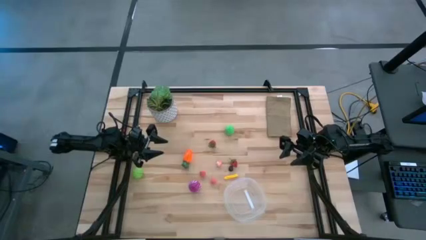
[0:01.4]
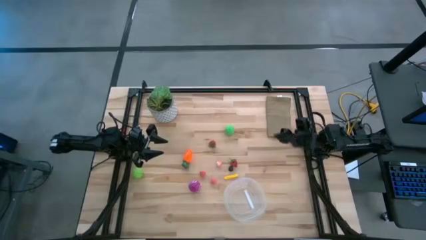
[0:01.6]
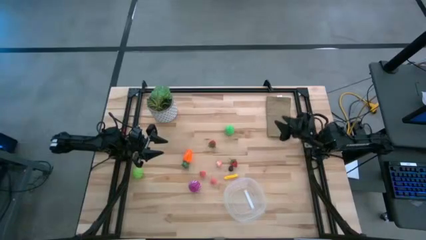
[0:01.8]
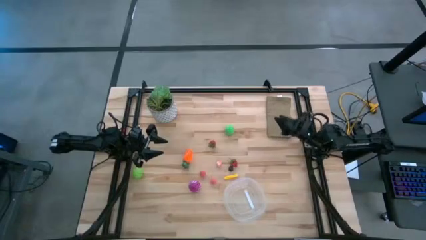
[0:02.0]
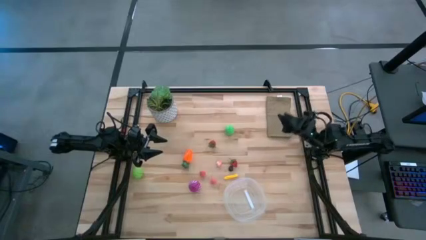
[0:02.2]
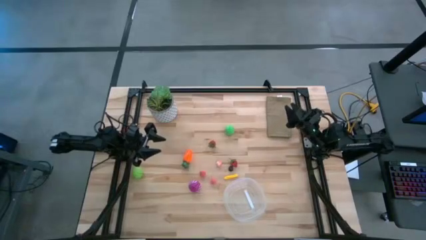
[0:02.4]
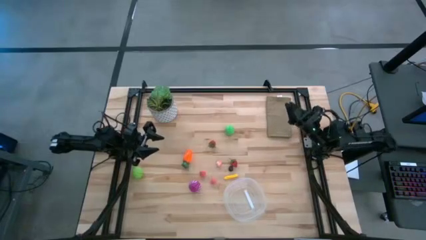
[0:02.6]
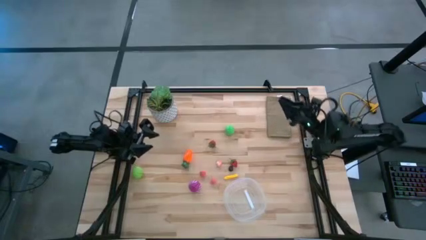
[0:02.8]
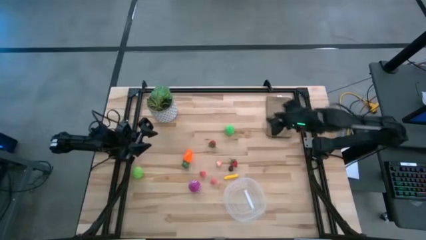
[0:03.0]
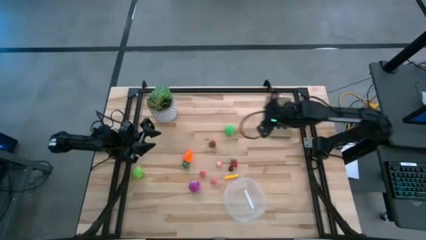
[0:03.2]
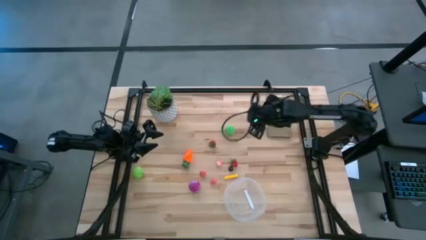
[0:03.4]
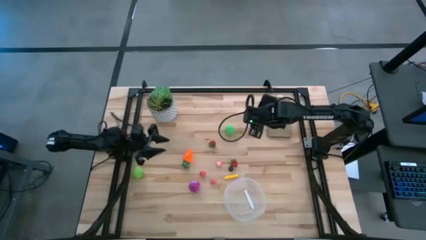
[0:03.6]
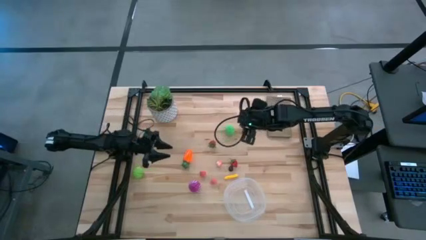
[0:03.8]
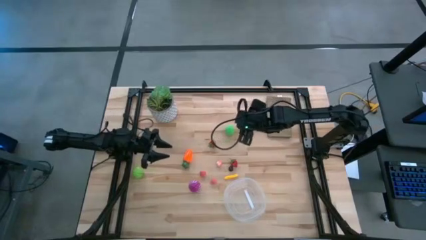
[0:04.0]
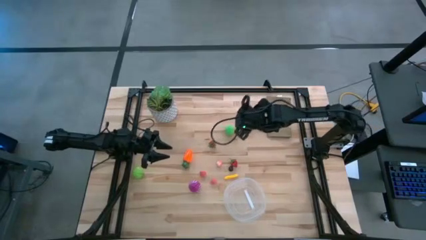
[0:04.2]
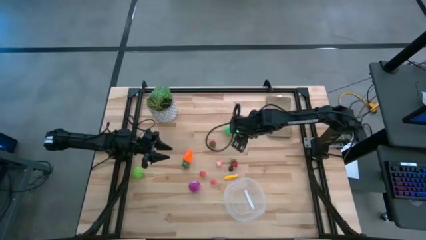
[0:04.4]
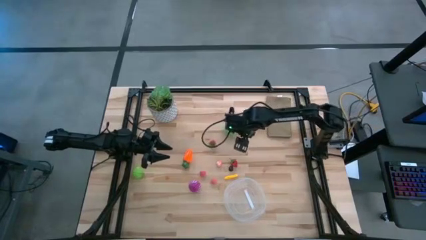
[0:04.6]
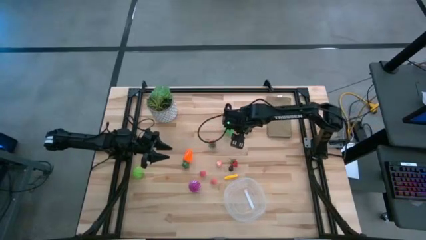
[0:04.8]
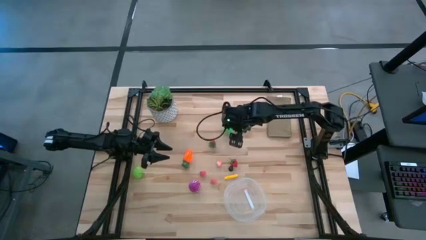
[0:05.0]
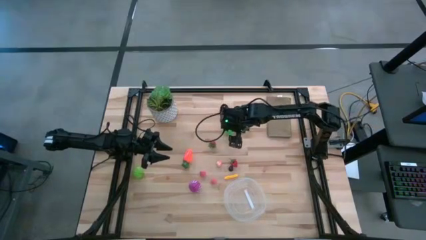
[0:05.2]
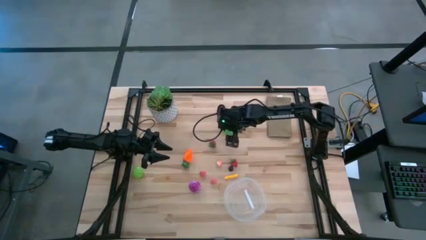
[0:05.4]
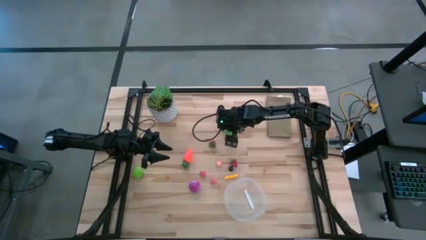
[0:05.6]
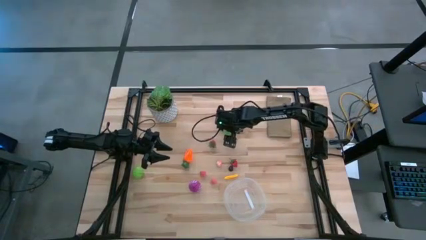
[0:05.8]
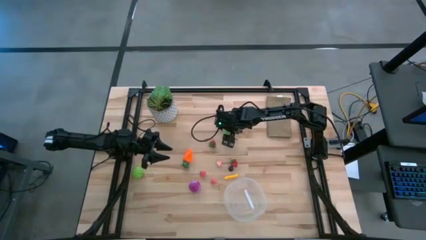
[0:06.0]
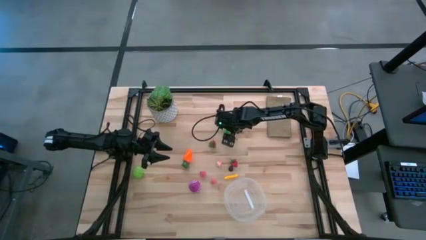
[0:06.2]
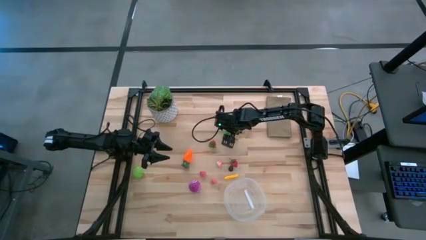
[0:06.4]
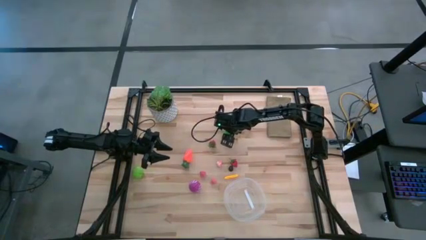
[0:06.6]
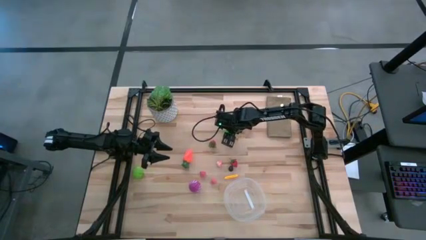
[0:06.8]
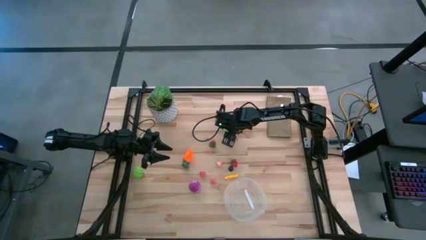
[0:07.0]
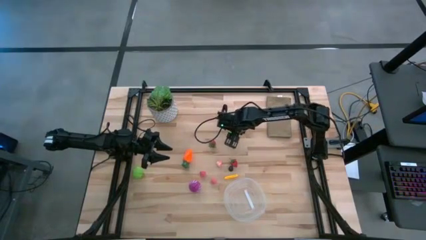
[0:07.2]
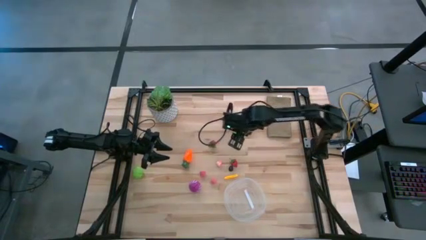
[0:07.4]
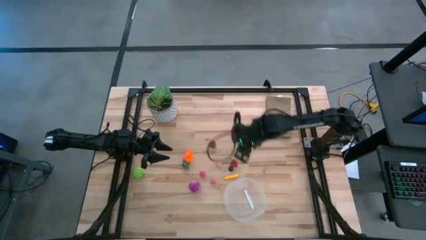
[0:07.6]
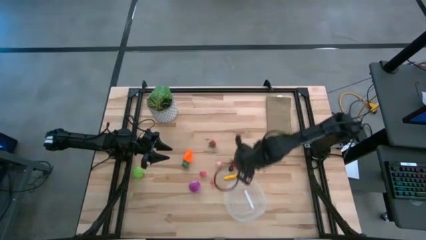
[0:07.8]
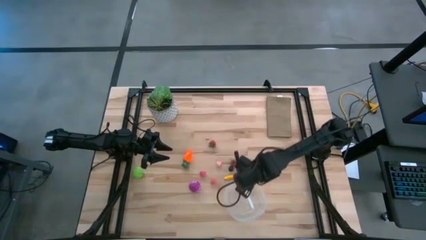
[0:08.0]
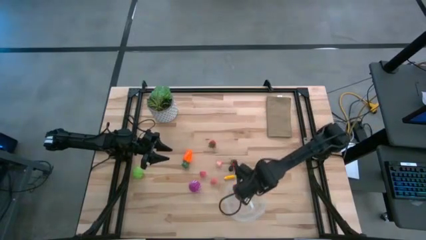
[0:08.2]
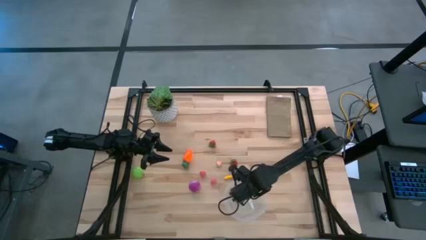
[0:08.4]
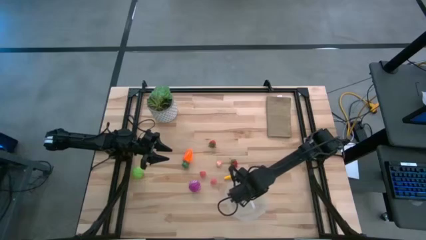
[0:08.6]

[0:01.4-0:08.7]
Task: Pick and placing Produce into tupperware
Put the pear into the transparent bin

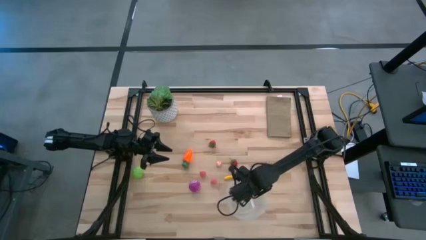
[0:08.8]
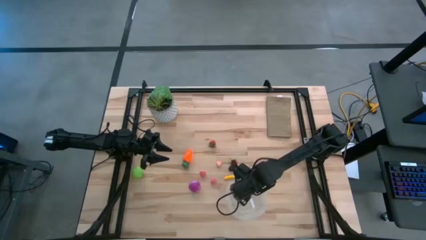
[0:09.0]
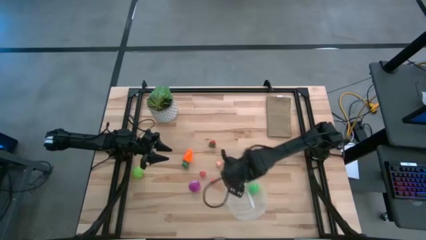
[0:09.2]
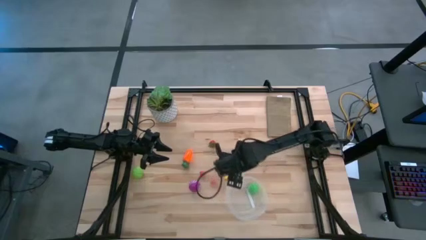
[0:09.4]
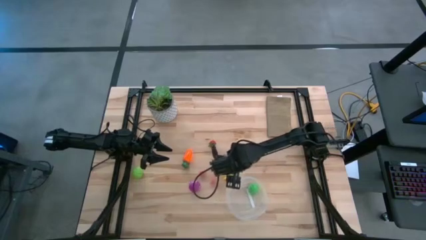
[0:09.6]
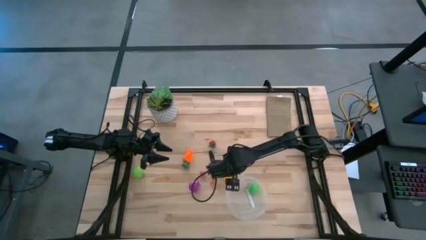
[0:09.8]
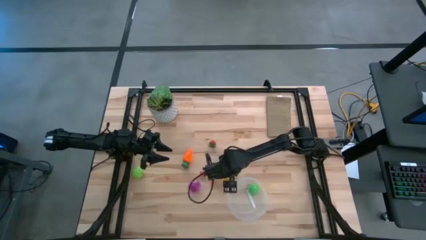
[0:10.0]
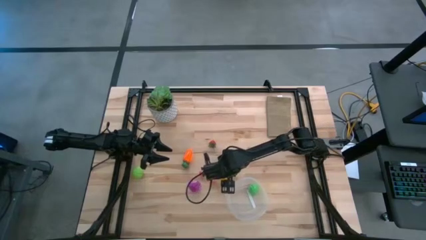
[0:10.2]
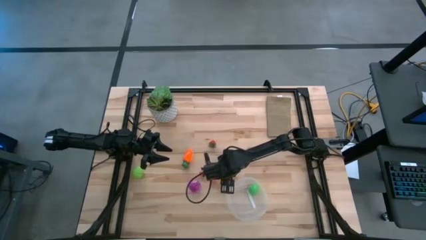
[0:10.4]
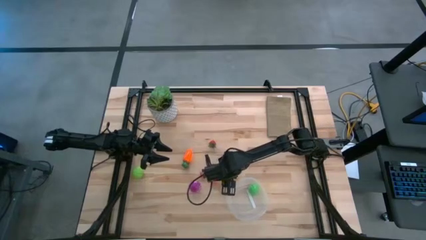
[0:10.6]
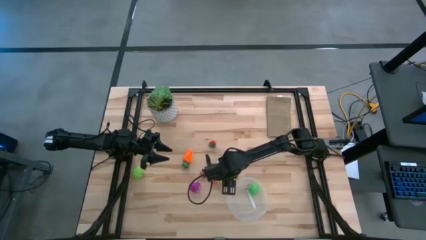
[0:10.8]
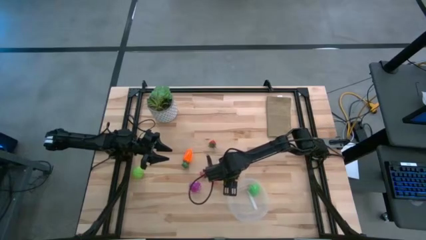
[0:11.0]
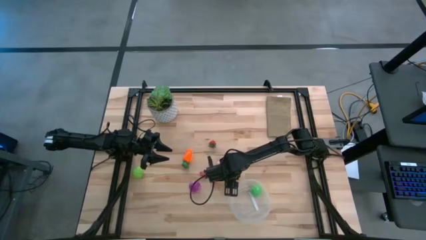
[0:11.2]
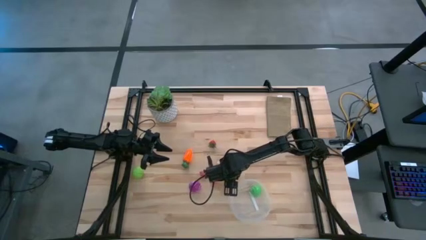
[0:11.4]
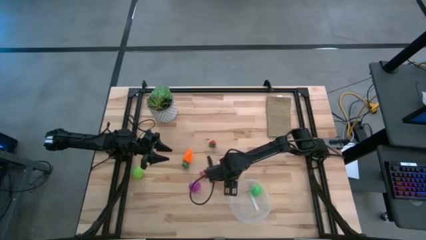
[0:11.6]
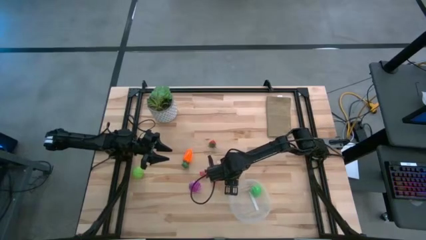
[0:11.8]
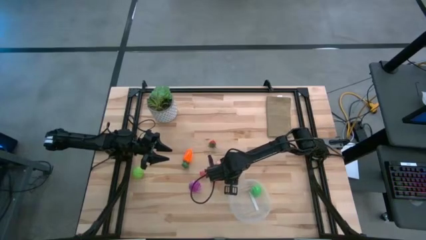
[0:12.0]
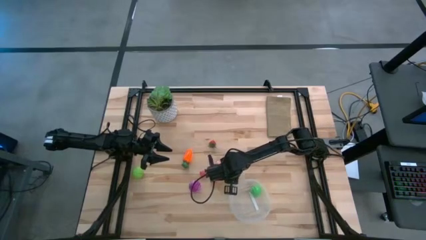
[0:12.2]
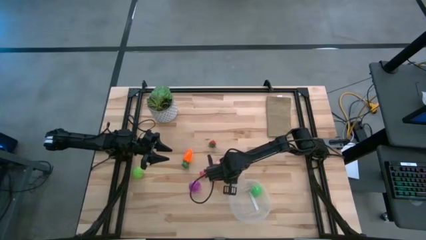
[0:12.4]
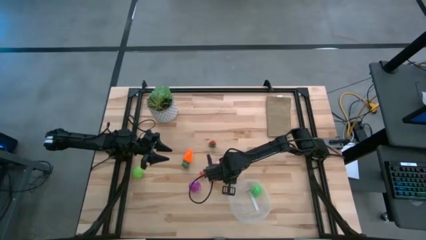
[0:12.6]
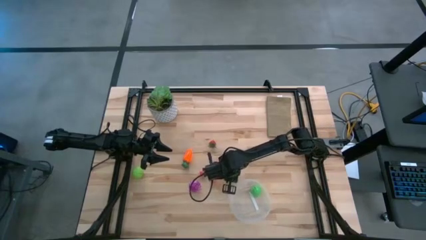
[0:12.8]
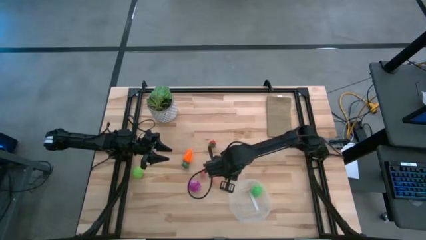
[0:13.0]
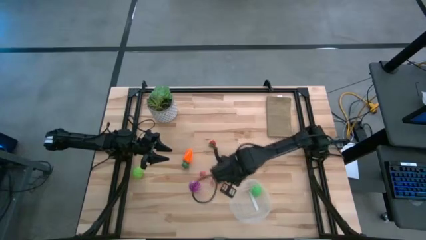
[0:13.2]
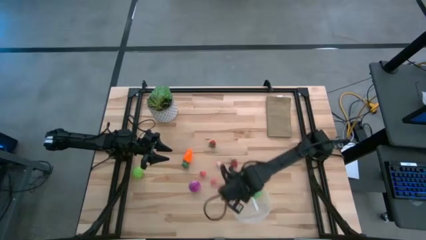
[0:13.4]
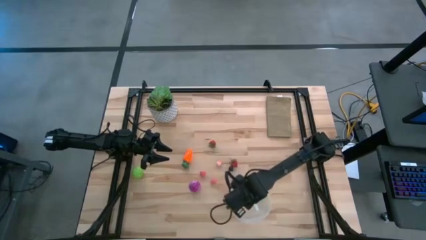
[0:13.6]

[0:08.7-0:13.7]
Put the corn into the transparent bin

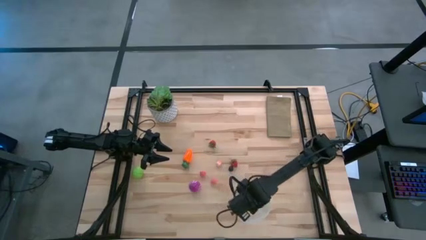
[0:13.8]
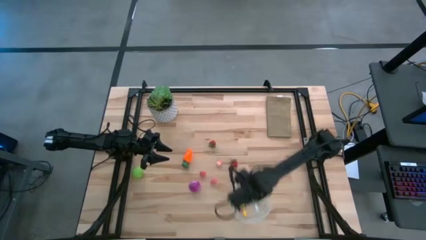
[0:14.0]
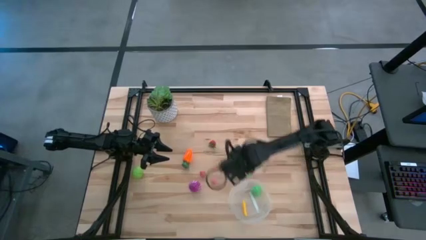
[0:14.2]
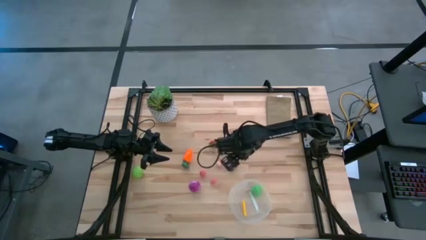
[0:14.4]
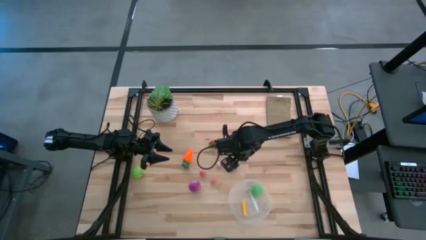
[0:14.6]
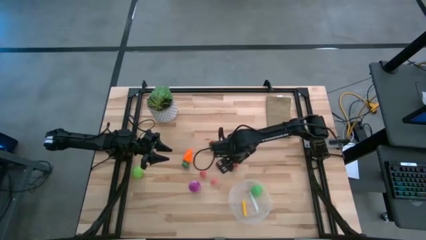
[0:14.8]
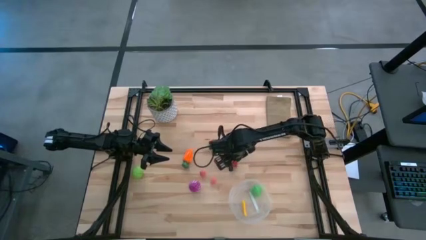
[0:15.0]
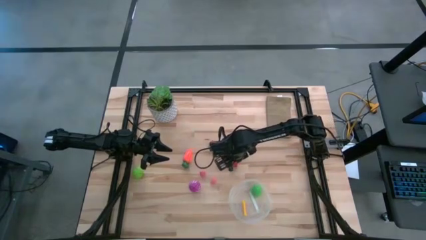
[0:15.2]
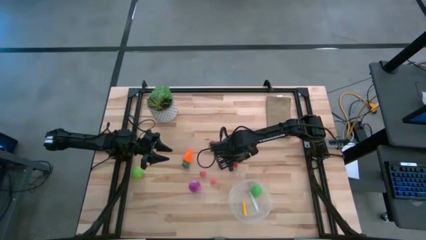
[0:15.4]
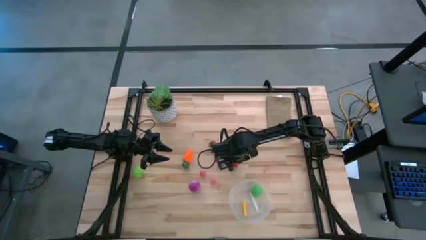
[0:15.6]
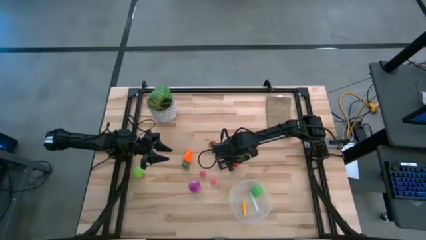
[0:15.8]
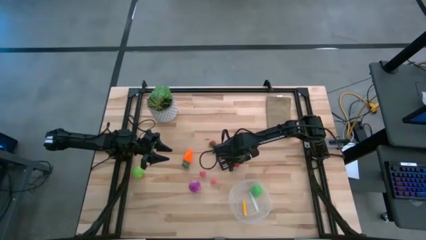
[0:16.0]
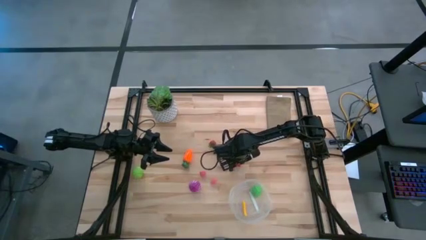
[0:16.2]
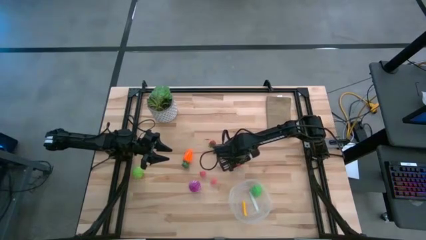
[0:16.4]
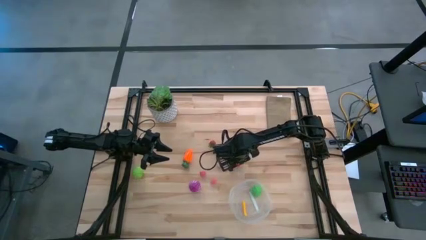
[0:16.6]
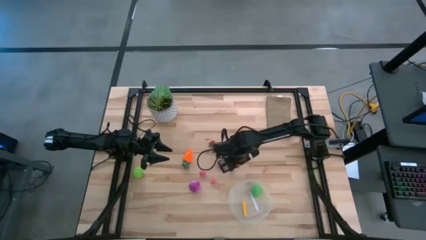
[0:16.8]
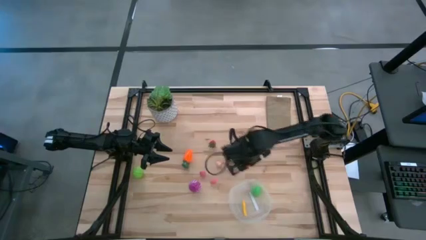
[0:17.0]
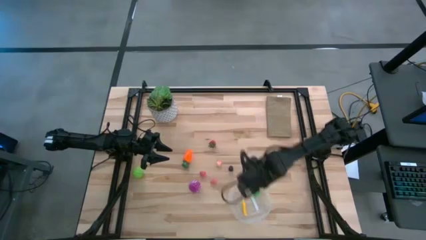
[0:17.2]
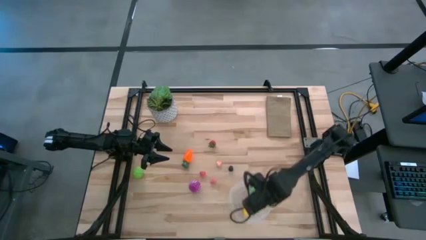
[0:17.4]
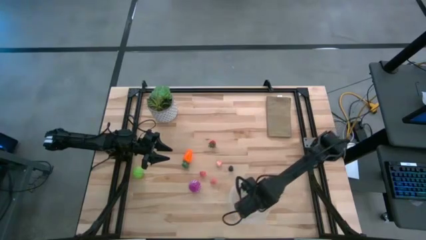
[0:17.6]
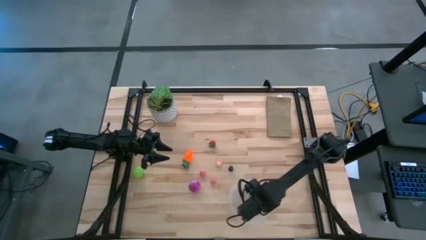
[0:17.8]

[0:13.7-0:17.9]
Put the bottom strawberry into the transparent bin
